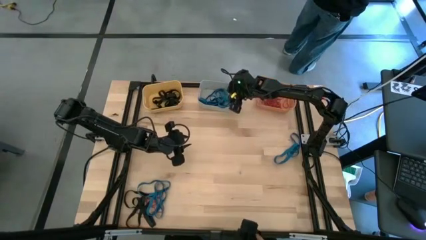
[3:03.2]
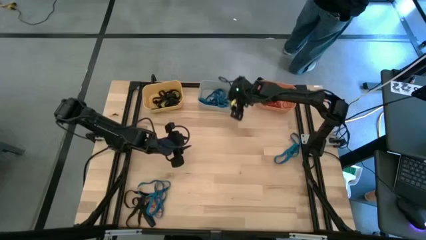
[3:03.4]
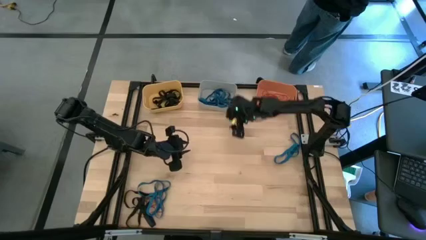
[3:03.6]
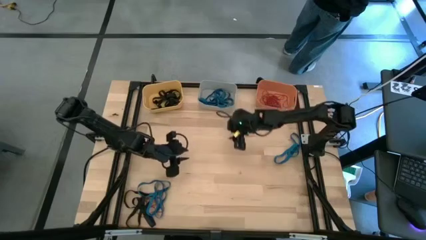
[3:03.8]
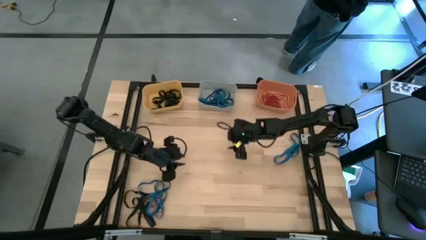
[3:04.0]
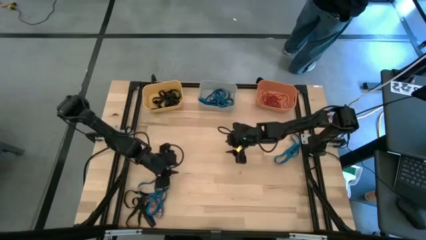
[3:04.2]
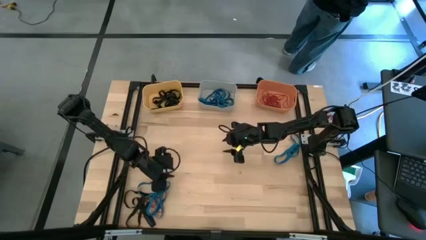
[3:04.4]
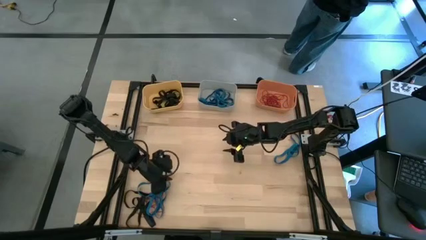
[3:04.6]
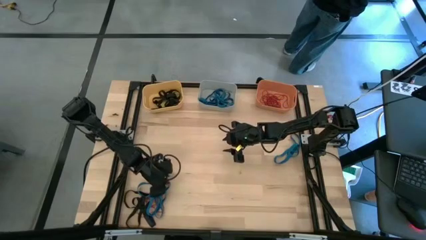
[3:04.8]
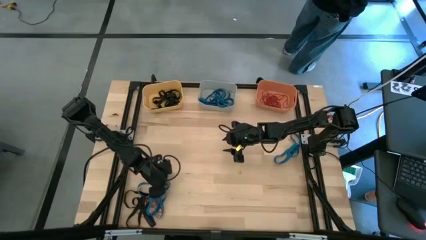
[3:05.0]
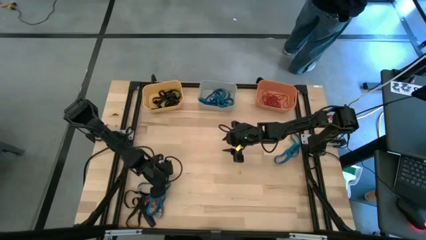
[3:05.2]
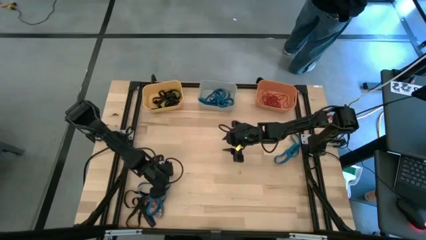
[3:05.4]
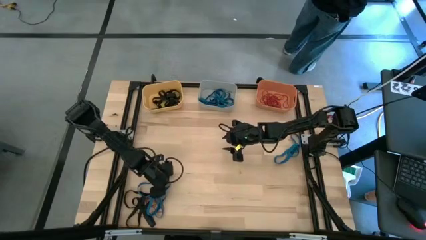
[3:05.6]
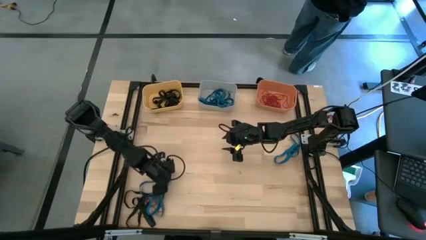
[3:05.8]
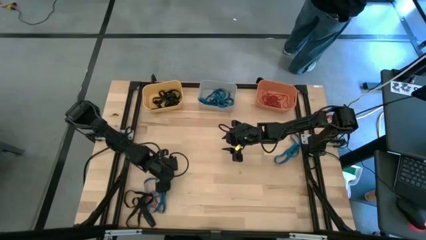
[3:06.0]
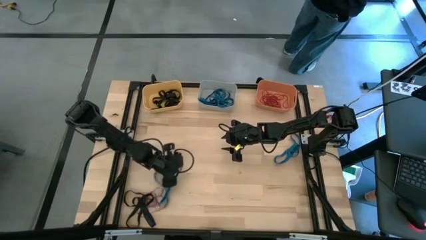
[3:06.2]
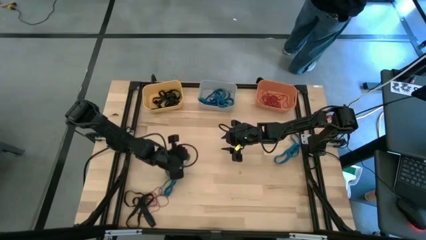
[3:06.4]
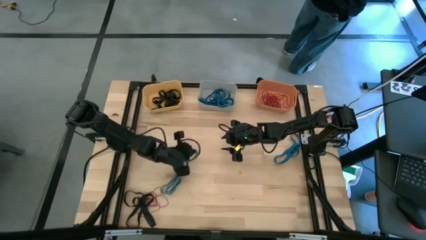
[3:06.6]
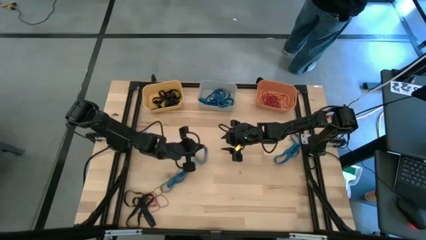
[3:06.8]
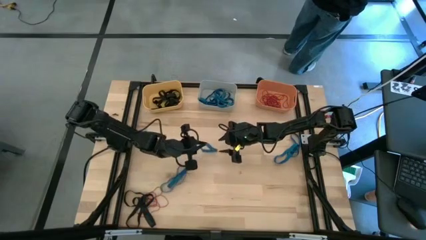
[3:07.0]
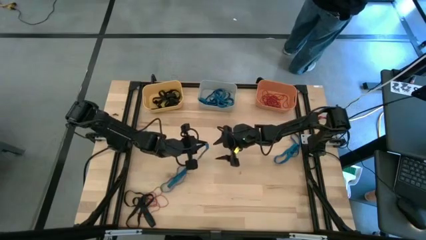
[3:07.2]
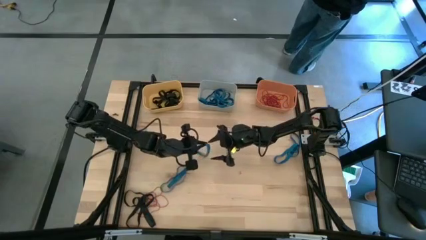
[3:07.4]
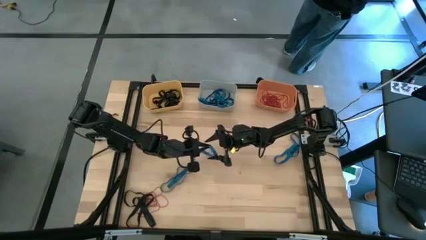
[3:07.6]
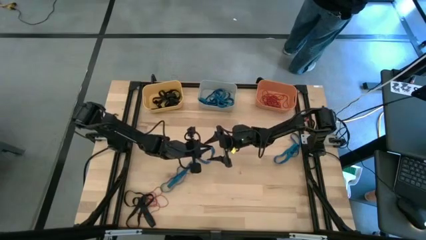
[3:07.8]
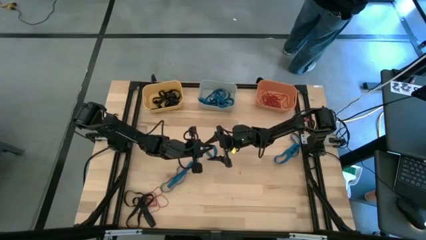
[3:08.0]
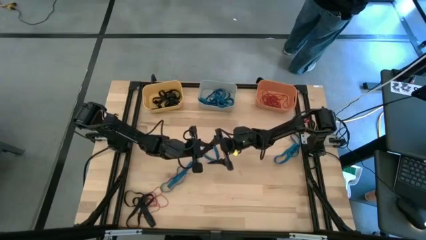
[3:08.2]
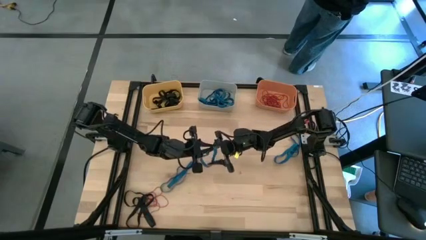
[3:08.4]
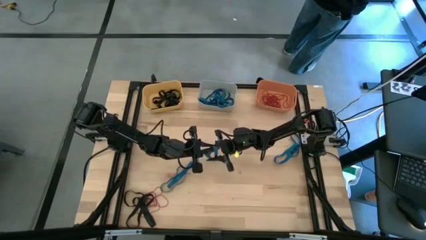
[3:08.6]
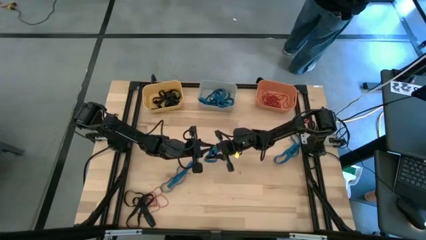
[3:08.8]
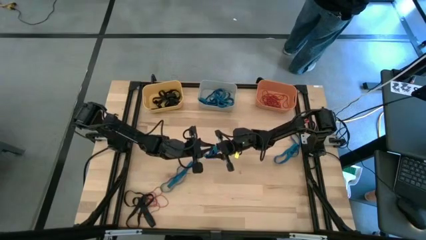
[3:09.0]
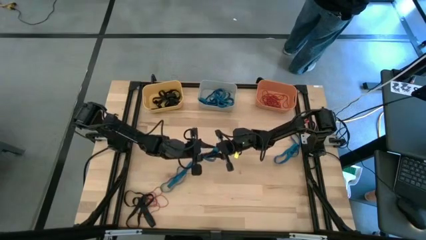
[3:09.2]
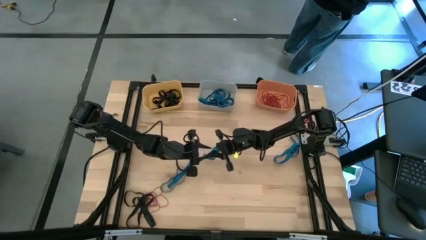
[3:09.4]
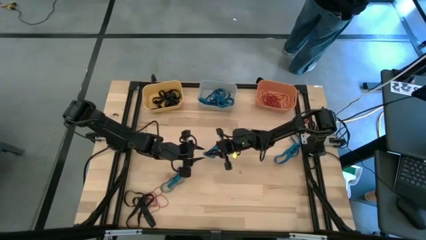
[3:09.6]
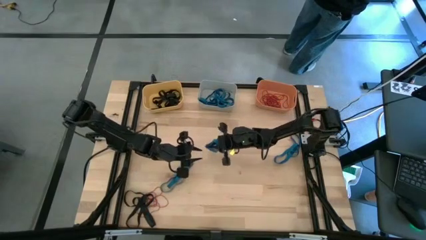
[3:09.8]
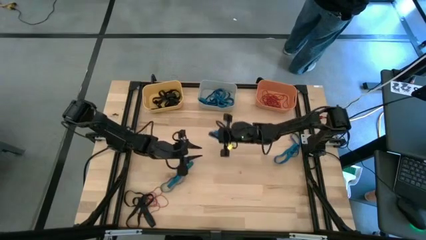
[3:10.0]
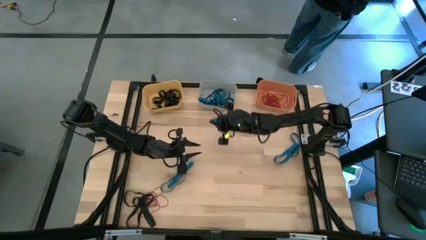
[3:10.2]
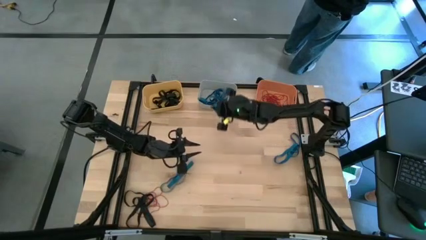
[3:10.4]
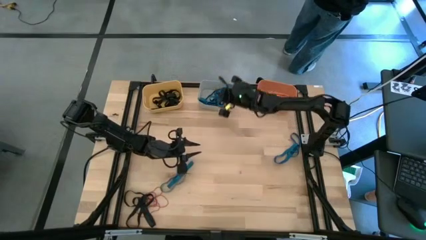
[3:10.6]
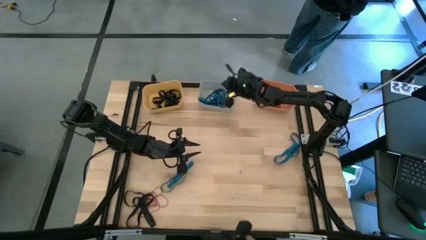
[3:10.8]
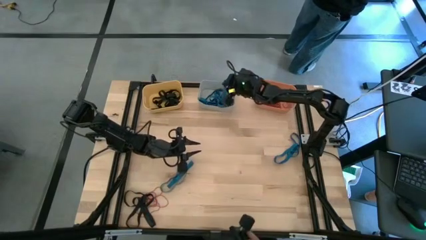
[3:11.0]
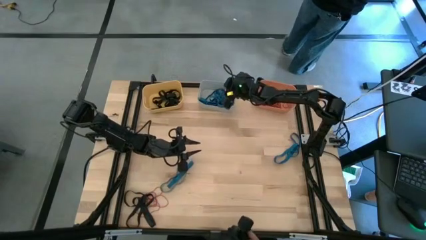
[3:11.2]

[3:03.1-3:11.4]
Task: Sort rubber bands into baskets
Put the blue rubber band into the grey bin

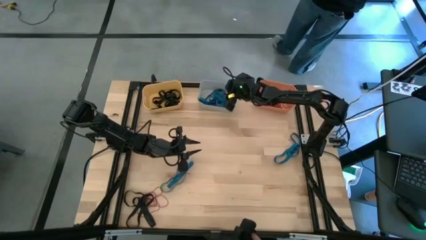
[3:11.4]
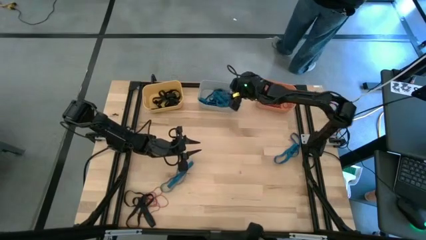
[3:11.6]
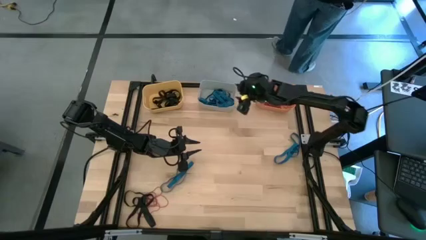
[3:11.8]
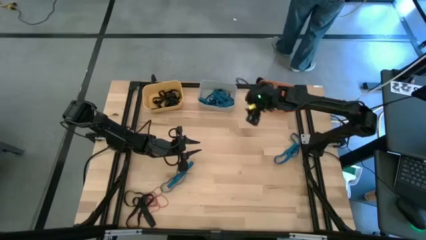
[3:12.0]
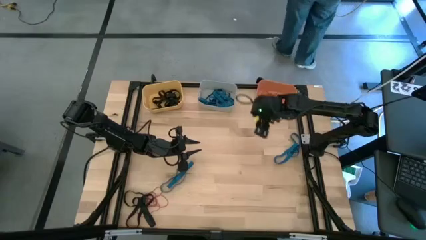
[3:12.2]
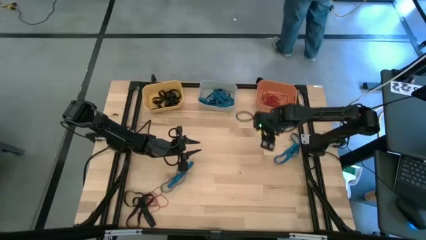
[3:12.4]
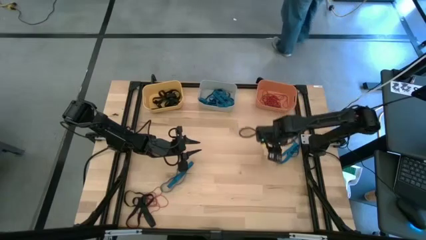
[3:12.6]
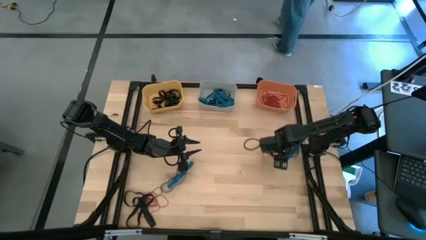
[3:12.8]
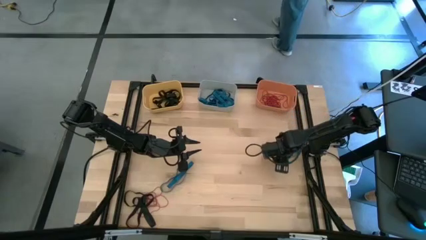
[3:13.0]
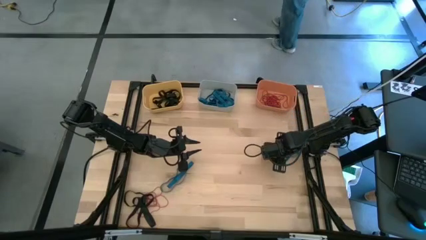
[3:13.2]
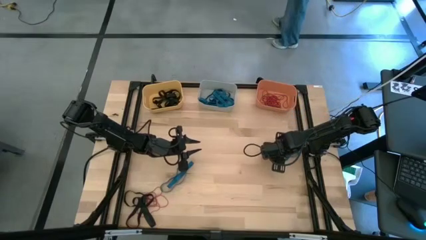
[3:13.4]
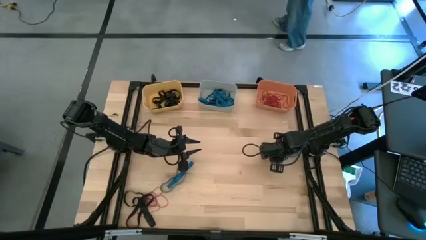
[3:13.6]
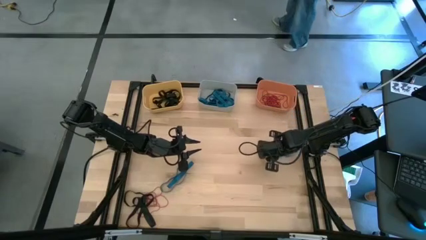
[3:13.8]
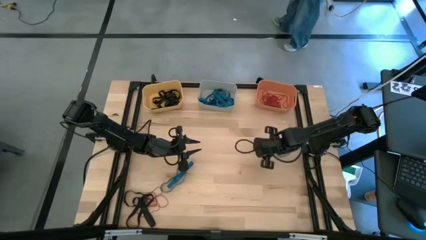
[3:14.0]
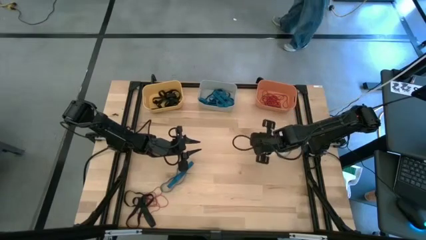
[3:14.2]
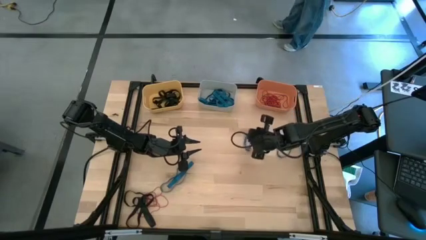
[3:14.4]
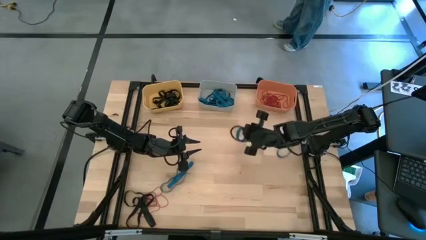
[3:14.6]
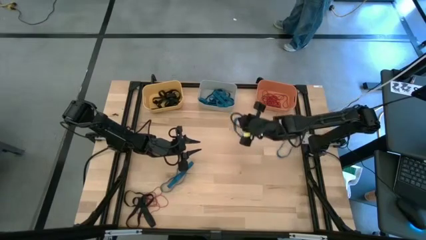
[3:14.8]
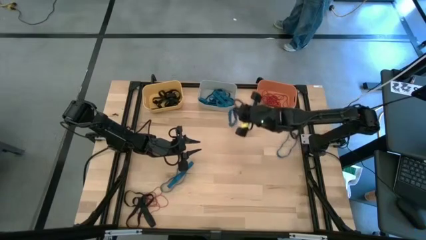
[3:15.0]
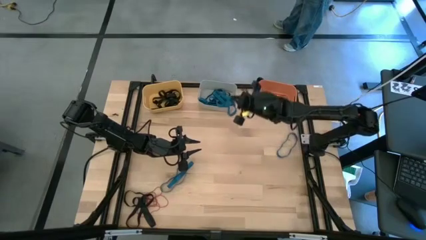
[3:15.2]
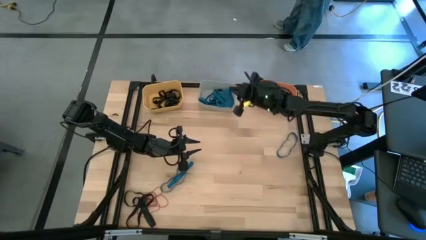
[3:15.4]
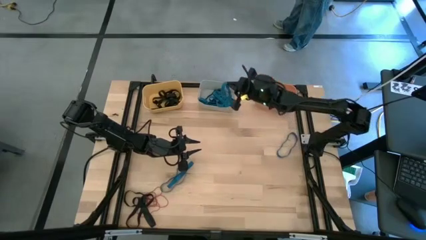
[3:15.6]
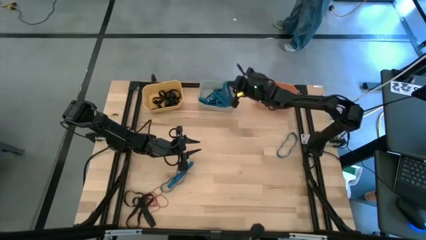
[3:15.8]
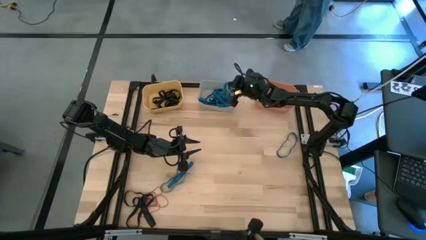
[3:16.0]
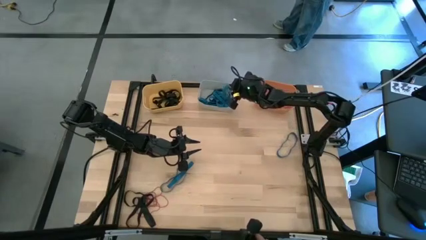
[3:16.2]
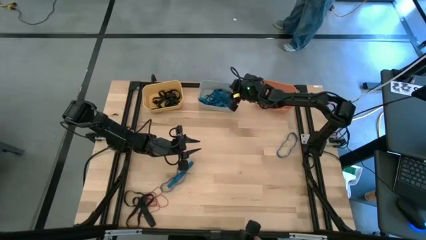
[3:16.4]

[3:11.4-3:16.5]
Put the blue rubber band into the grey bin

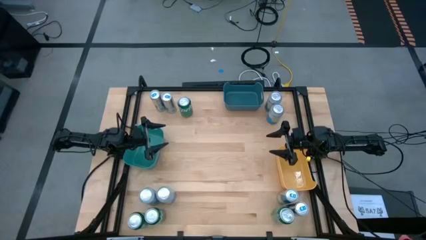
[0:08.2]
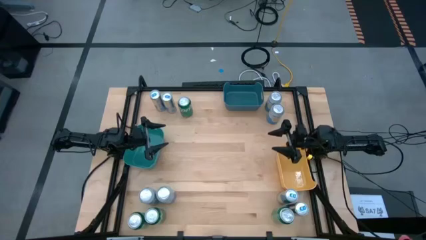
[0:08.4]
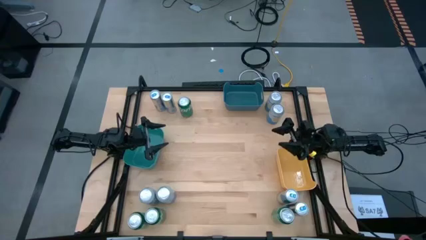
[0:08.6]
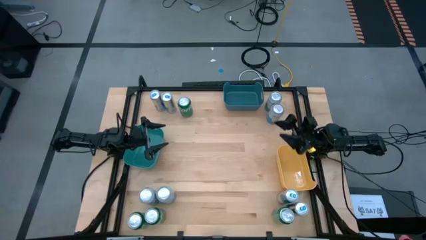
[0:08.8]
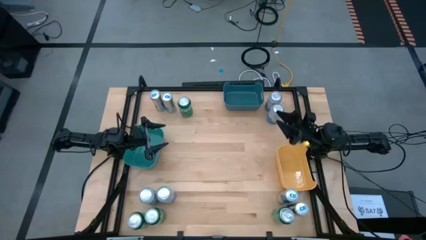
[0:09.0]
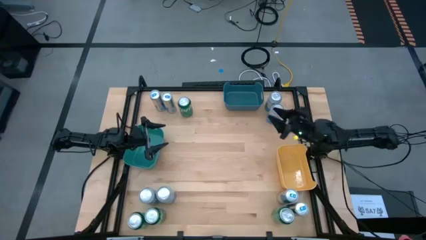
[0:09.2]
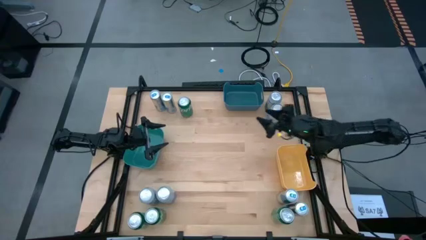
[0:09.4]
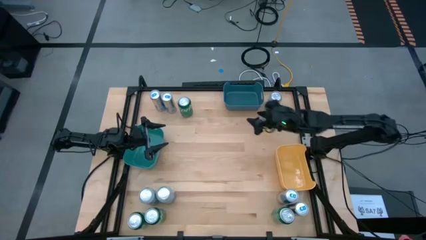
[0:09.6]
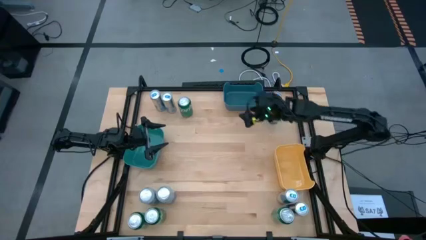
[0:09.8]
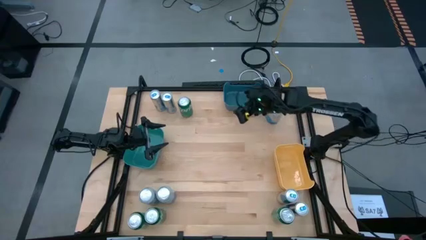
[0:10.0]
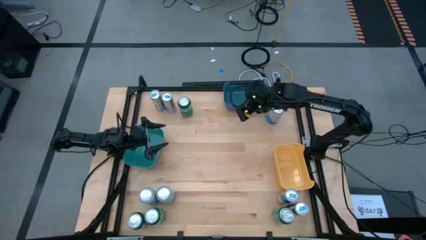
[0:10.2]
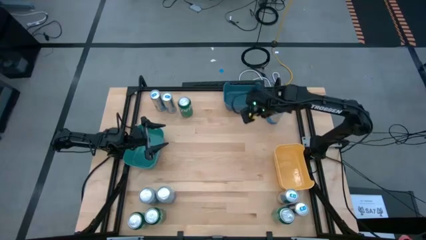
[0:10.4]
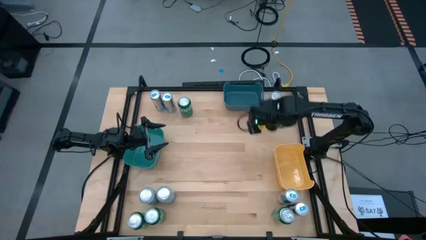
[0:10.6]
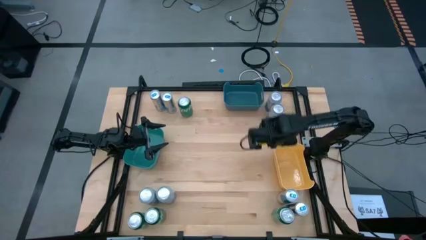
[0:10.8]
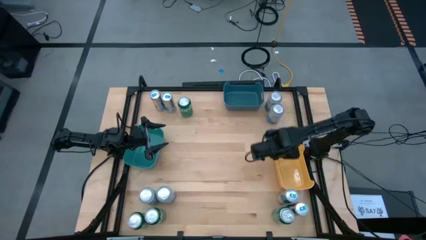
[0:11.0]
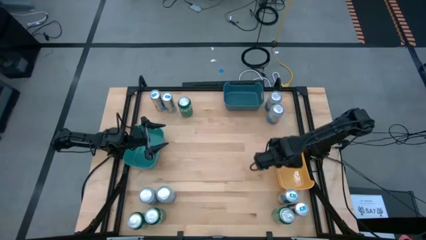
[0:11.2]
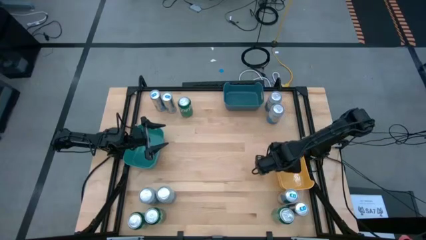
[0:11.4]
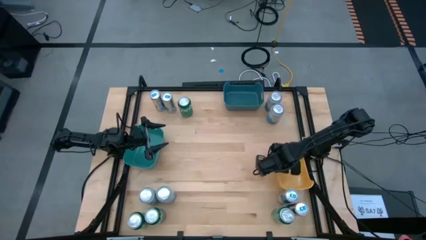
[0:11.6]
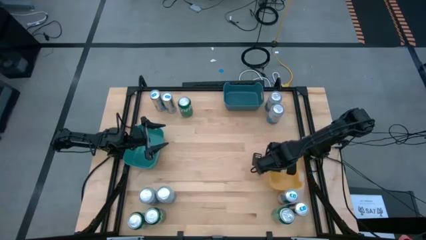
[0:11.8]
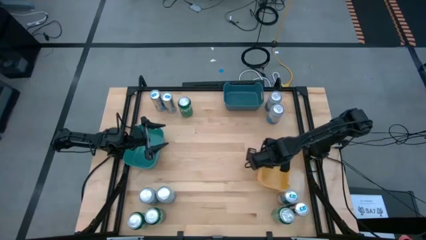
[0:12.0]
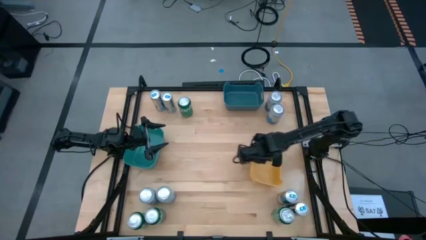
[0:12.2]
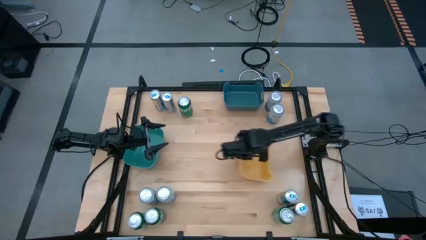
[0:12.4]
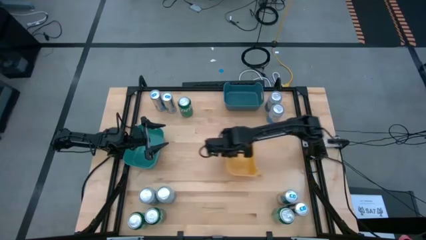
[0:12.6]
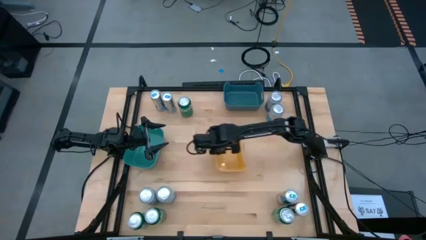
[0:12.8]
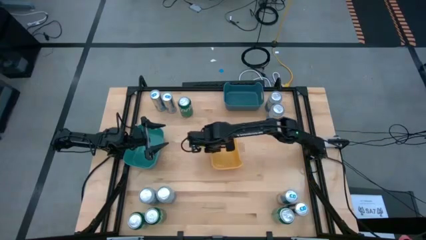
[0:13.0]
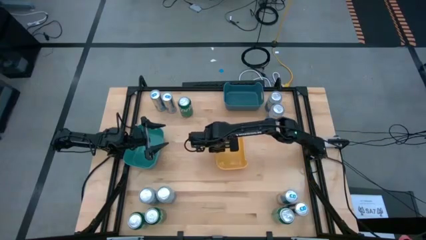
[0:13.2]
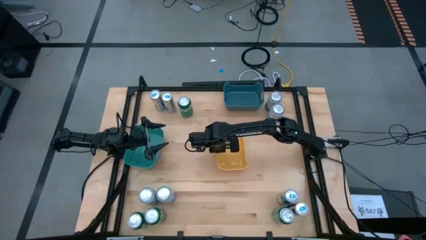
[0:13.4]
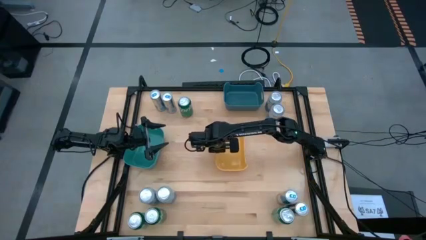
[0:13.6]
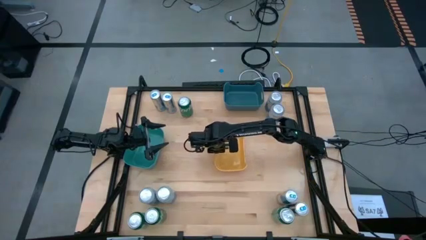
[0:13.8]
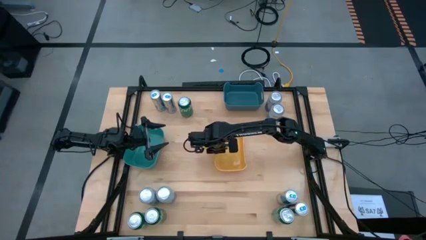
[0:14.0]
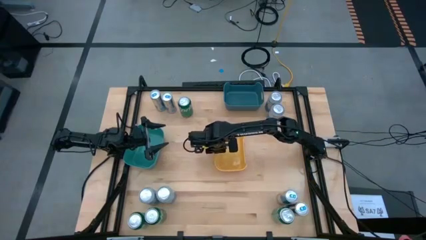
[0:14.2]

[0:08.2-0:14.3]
Task: Sort soda cans
Move the yellow bin to the center of the table
